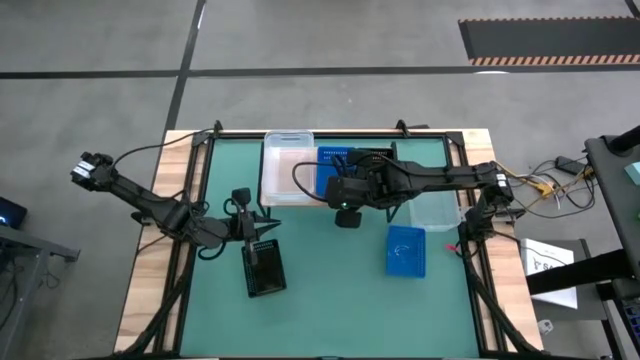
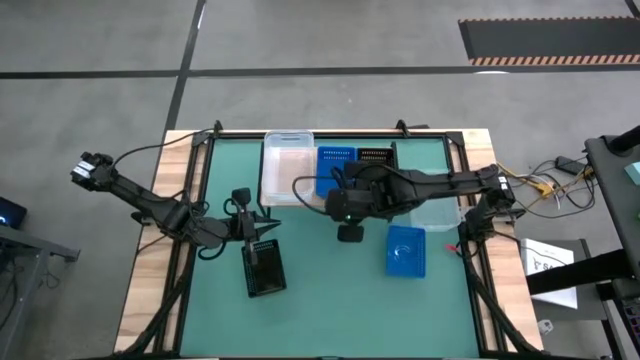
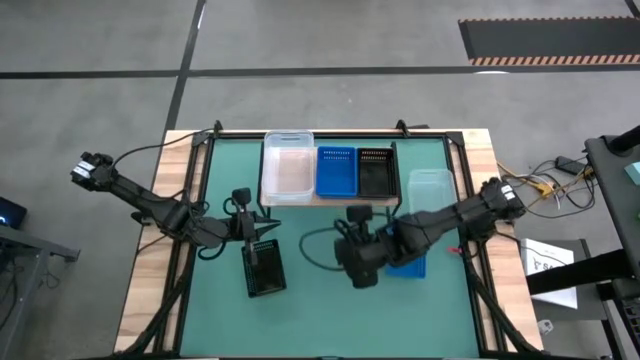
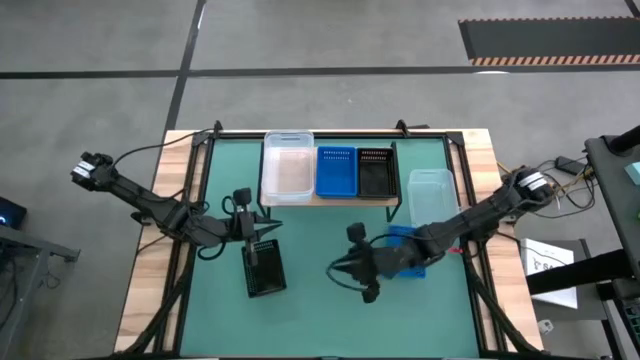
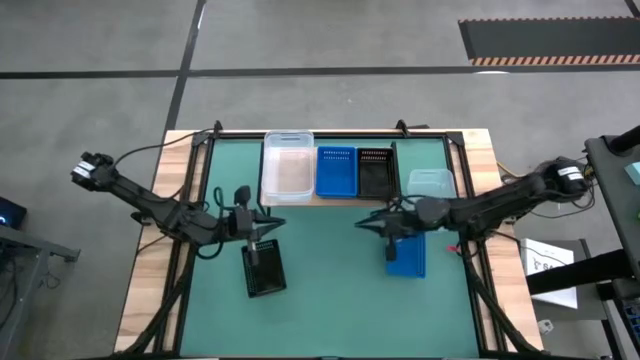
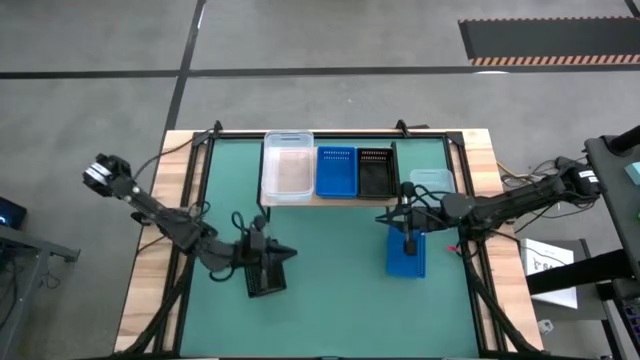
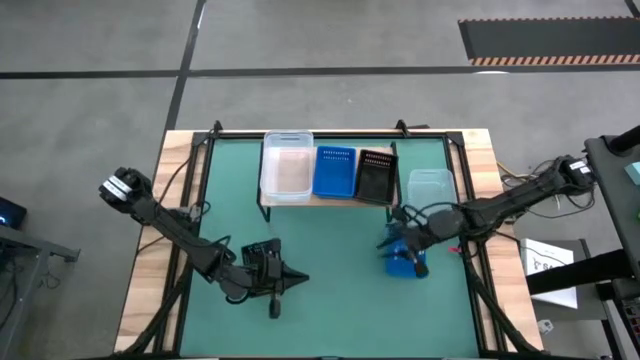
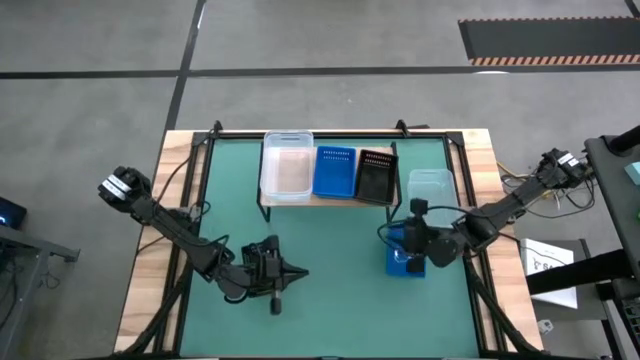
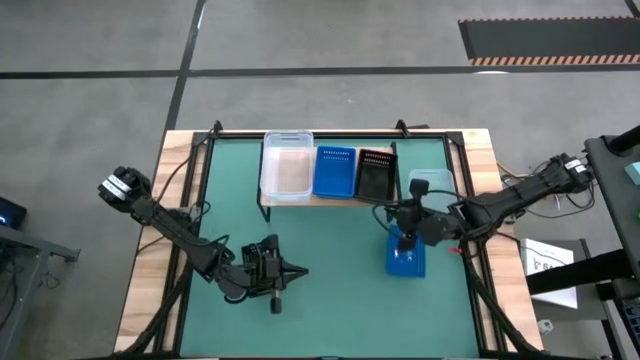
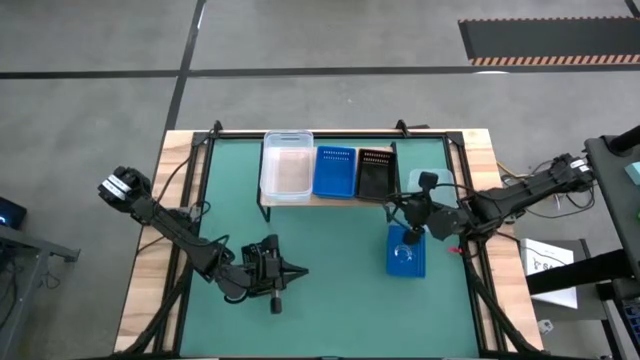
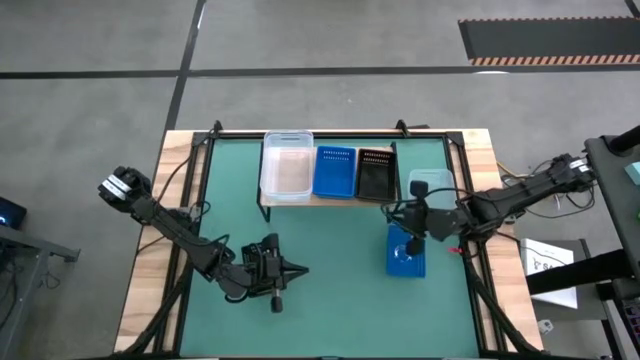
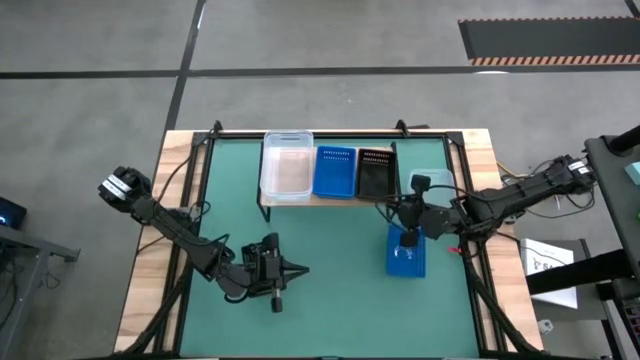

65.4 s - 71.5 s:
Task: Stack baskets on shelf by color
Adjust the black bin on the shelf

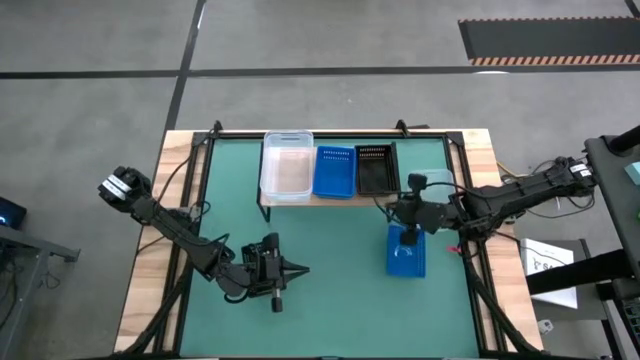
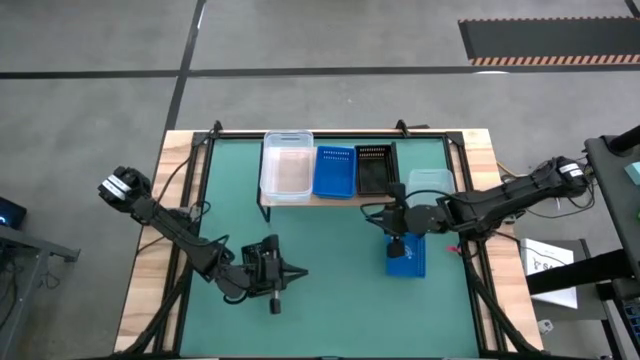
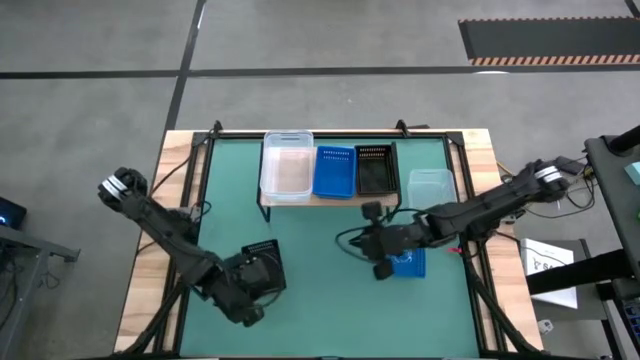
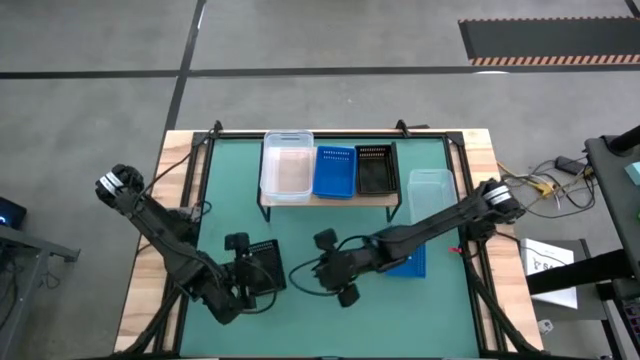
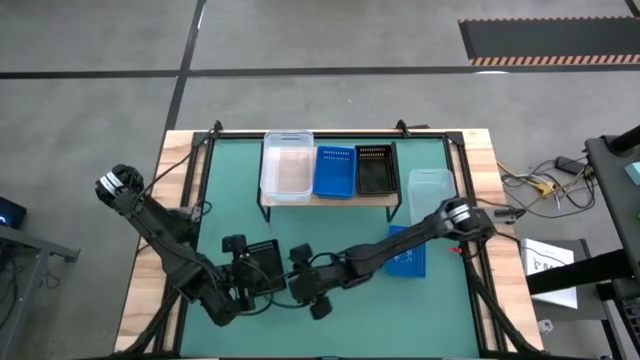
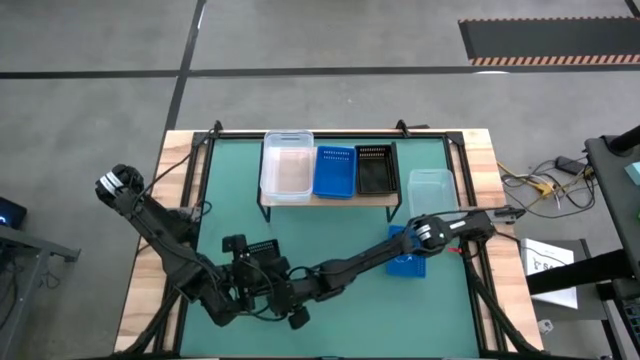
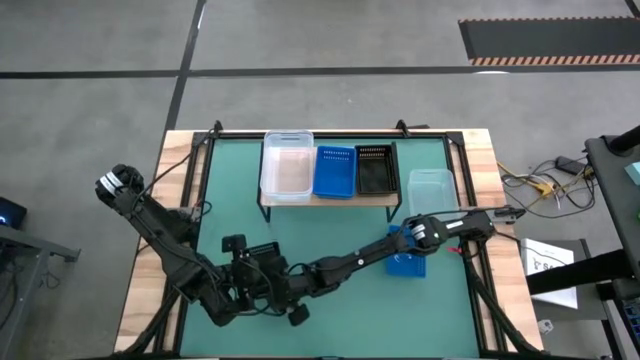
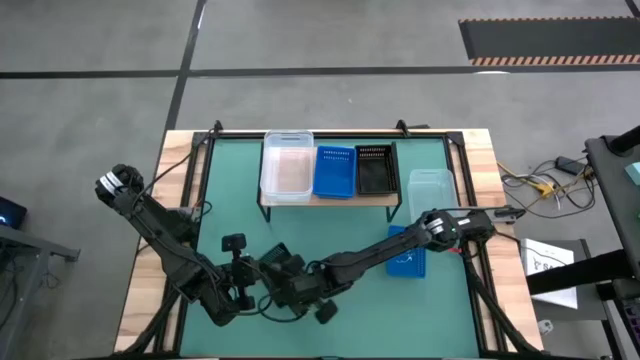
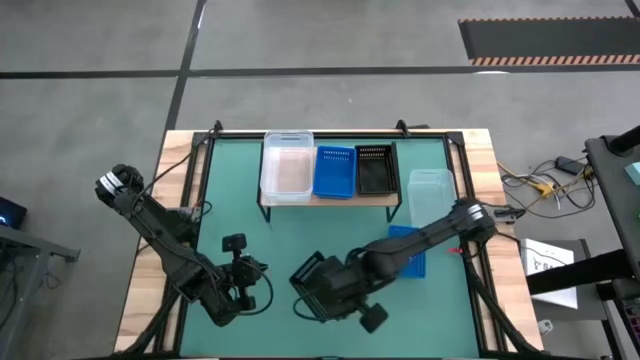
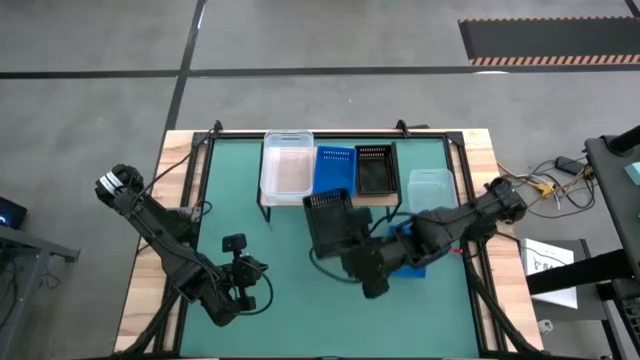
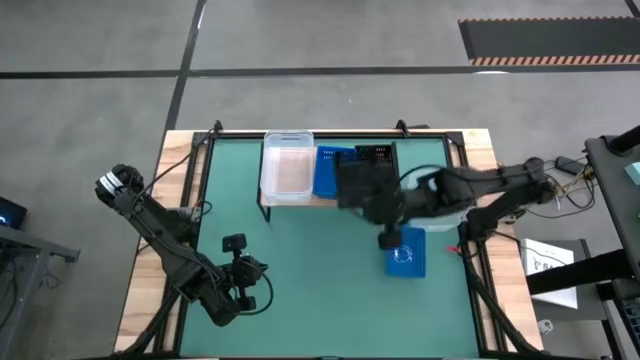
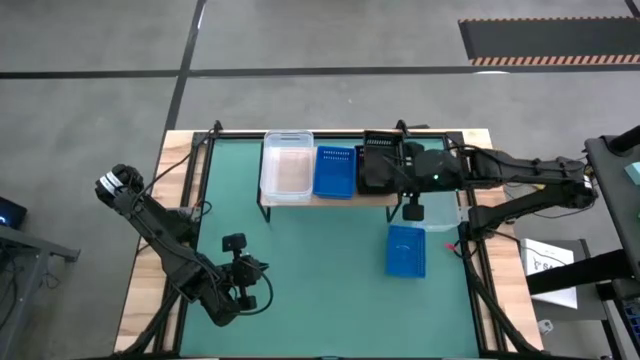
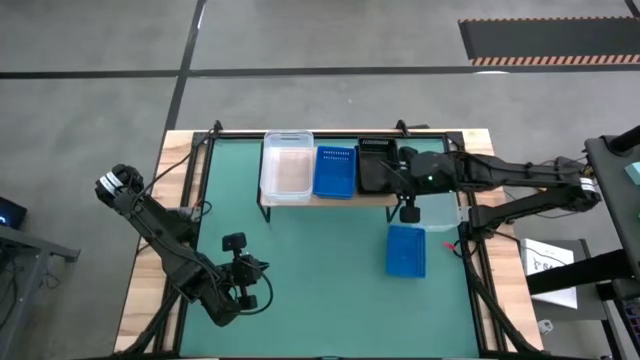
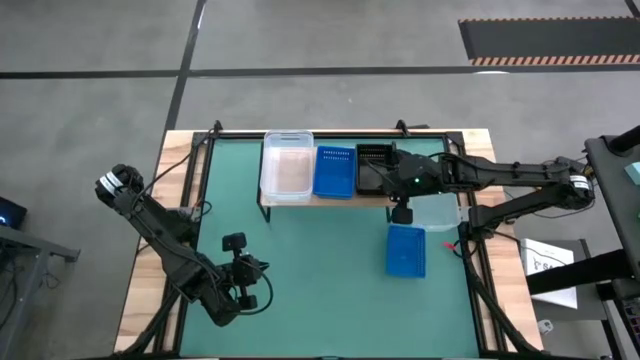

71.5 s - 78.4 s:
Stack the black bin on top of the black bins on the shelf

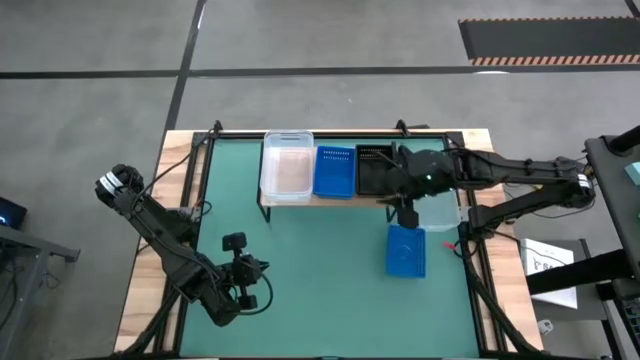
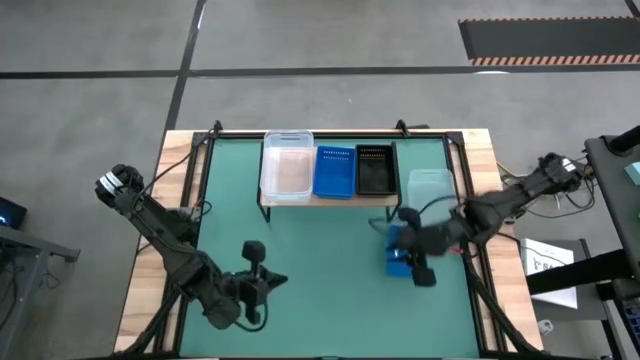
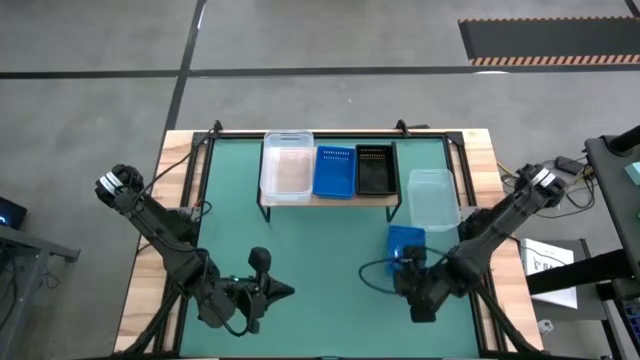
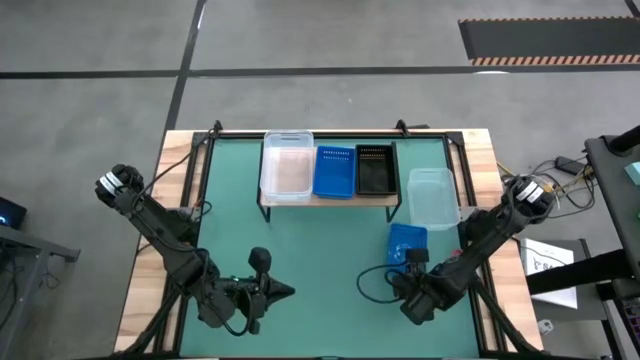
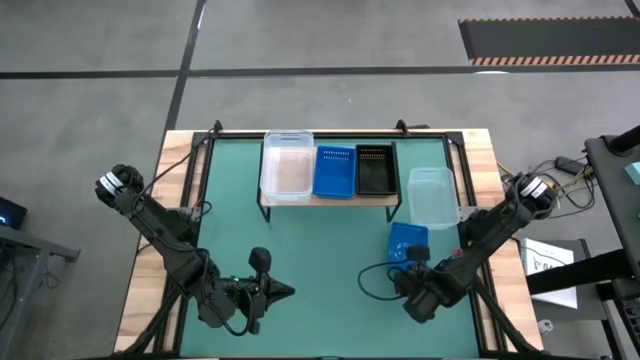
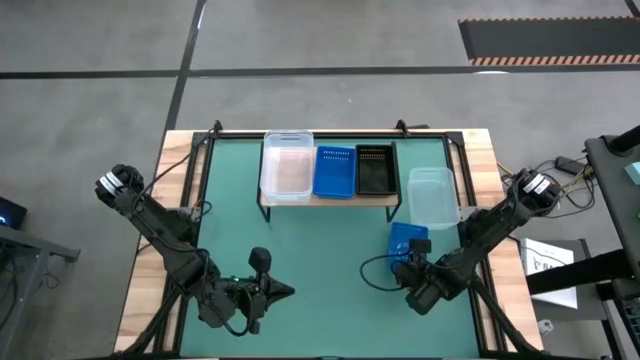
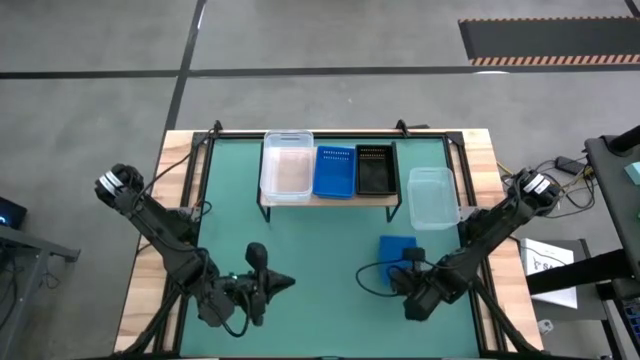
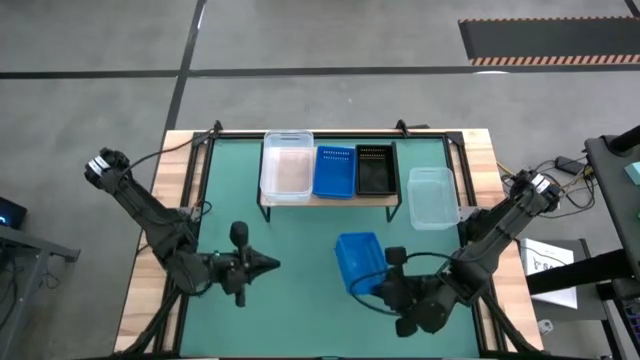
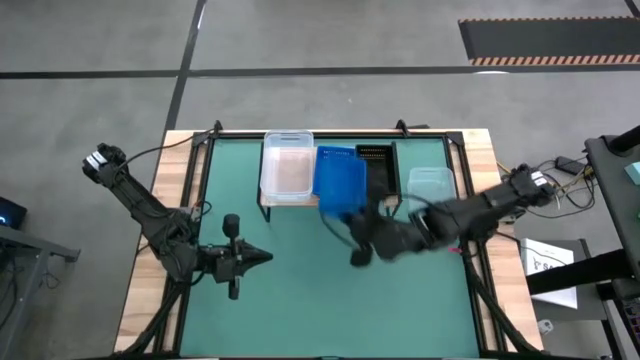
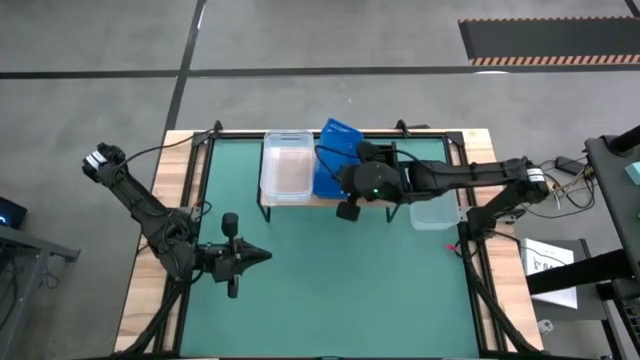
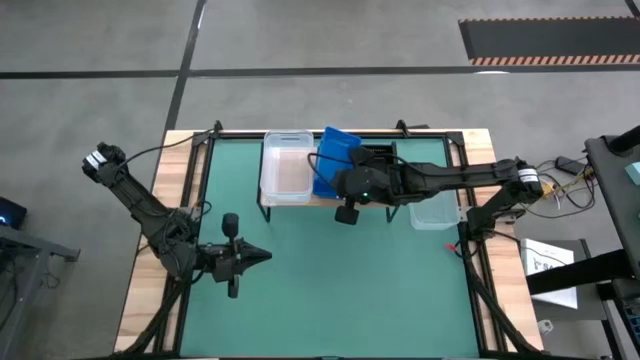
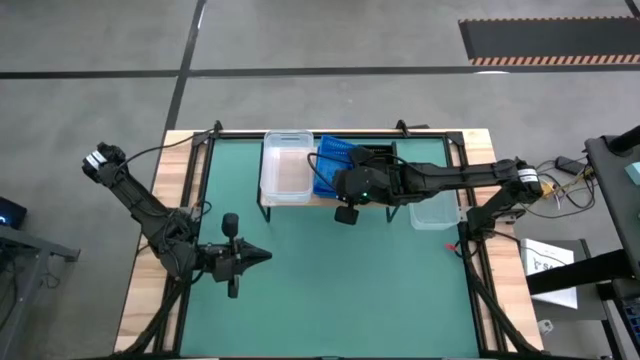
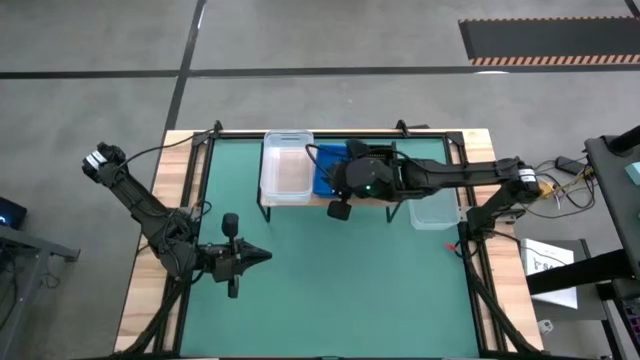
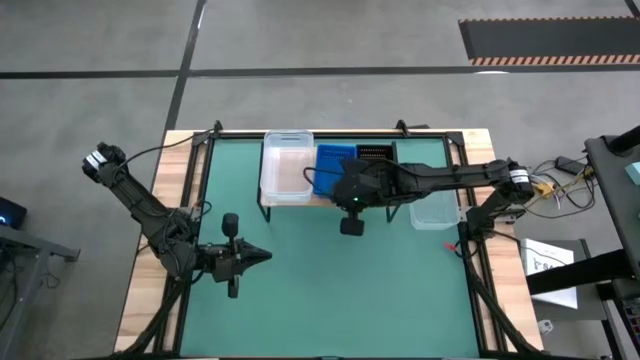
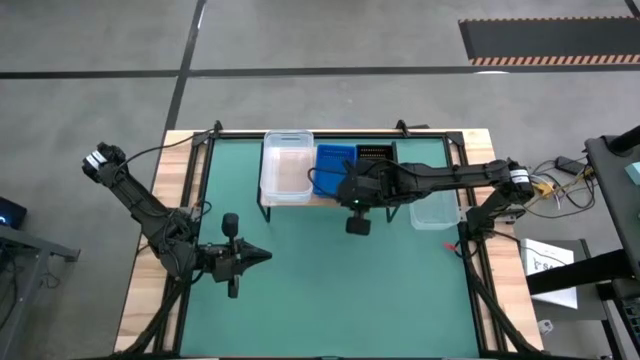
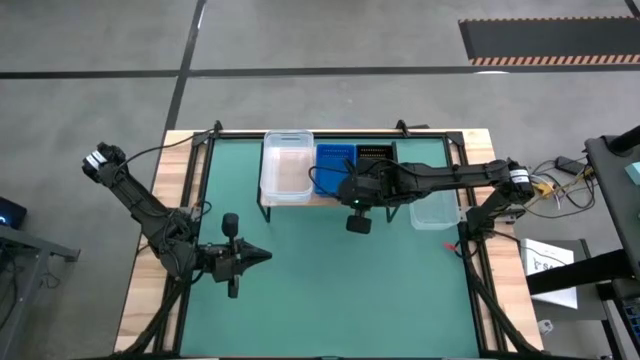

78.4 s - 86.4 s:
Stack the blue bin on top of the blue bins on the shelf
